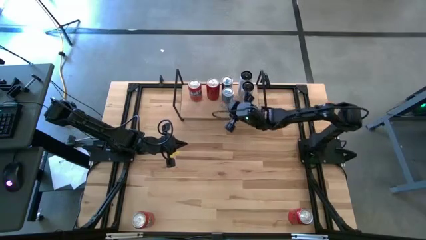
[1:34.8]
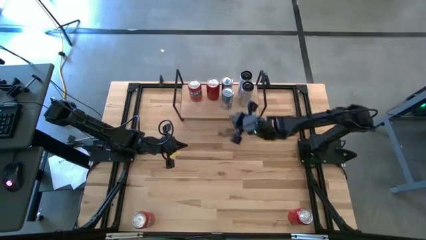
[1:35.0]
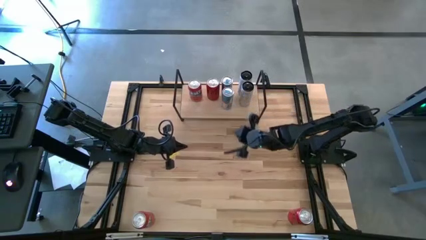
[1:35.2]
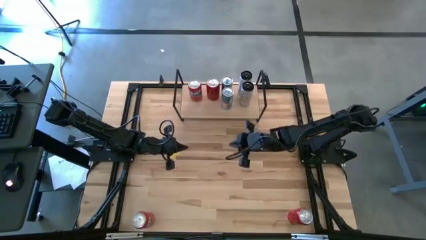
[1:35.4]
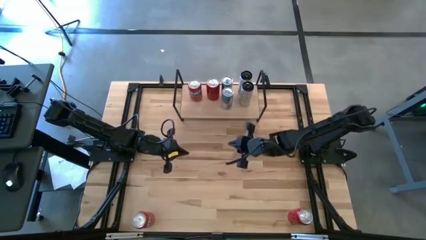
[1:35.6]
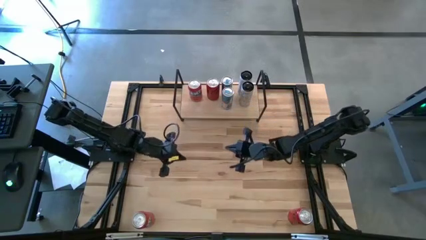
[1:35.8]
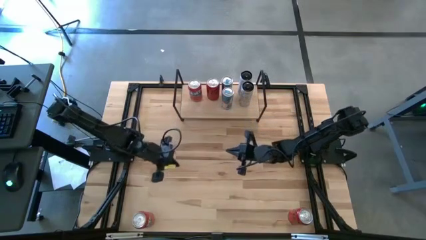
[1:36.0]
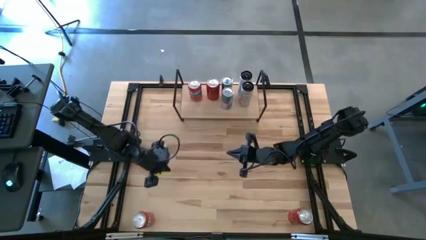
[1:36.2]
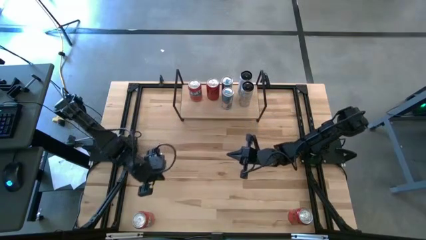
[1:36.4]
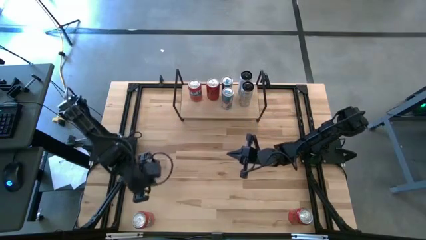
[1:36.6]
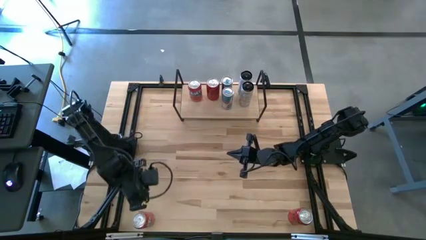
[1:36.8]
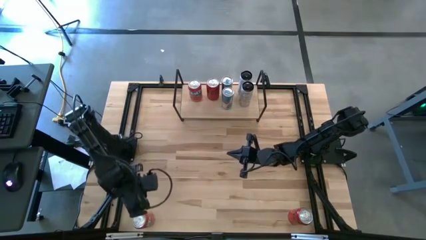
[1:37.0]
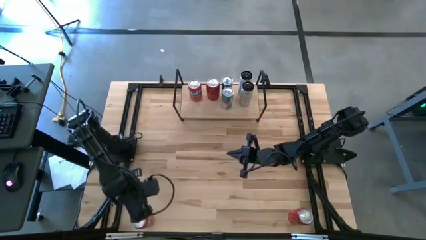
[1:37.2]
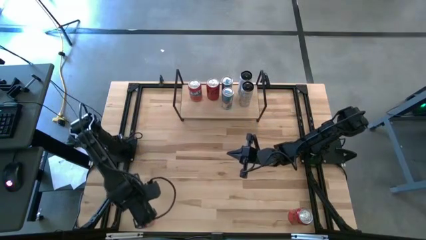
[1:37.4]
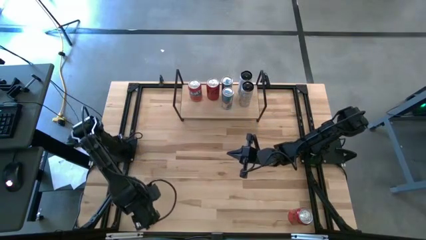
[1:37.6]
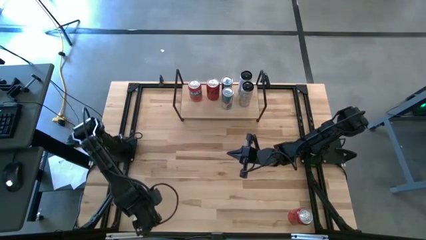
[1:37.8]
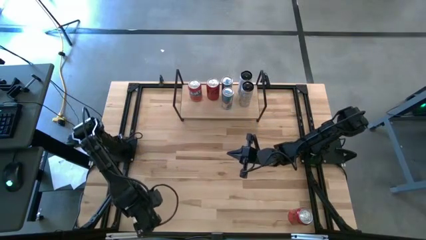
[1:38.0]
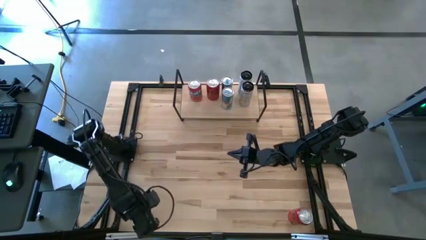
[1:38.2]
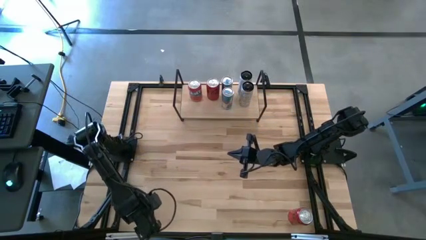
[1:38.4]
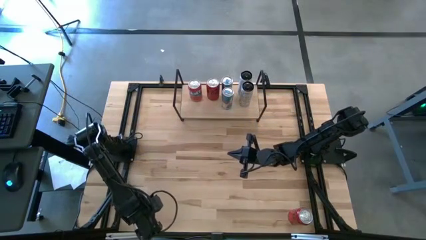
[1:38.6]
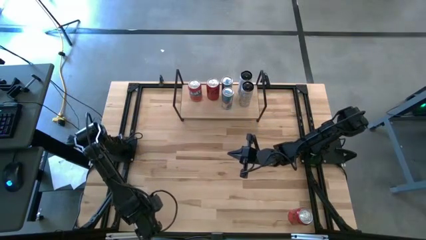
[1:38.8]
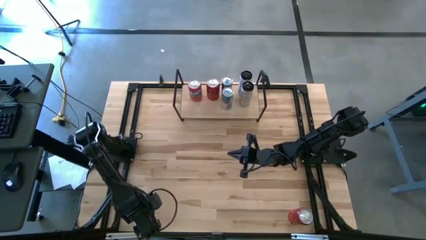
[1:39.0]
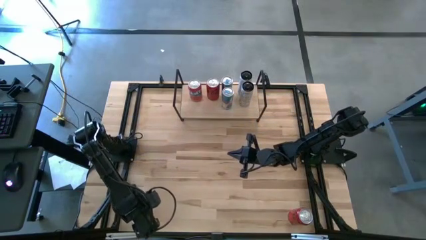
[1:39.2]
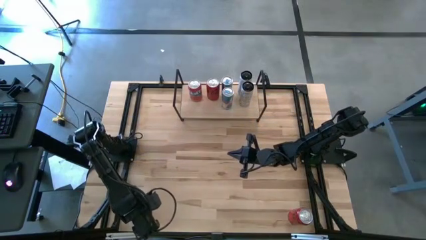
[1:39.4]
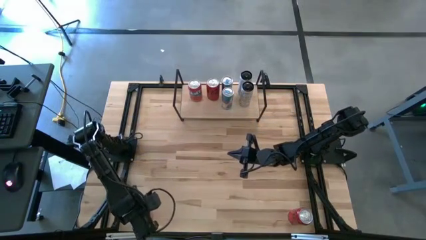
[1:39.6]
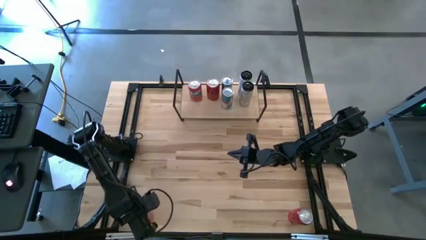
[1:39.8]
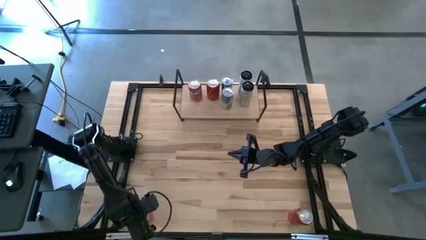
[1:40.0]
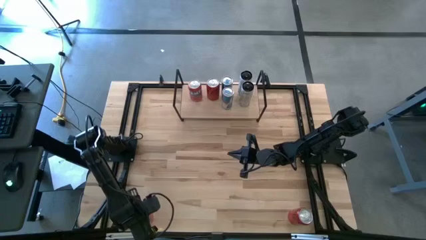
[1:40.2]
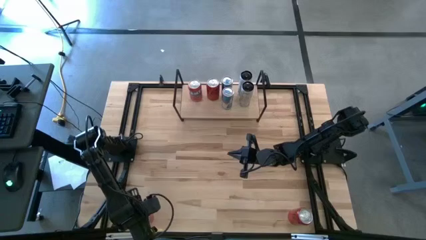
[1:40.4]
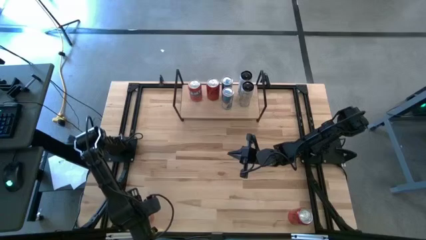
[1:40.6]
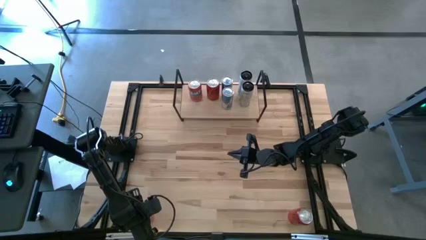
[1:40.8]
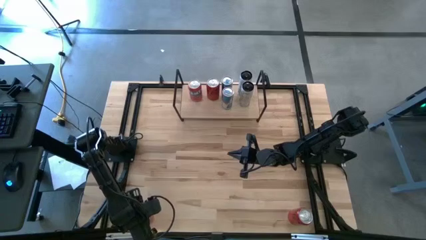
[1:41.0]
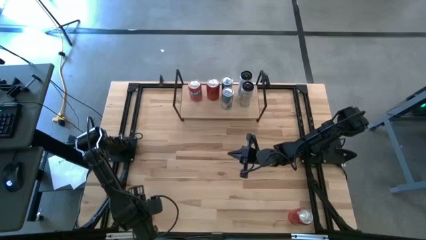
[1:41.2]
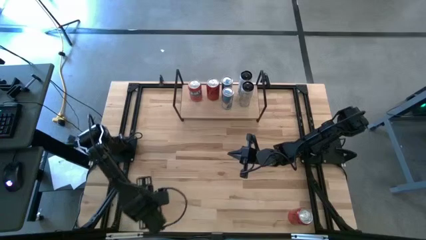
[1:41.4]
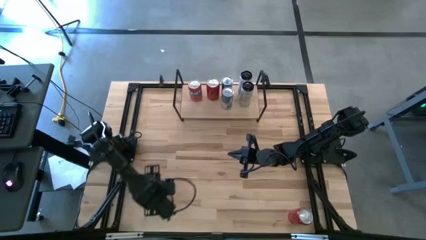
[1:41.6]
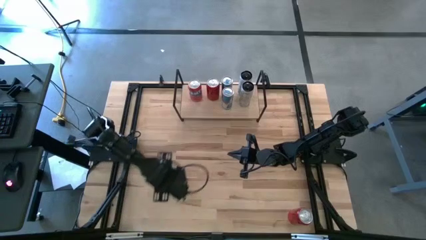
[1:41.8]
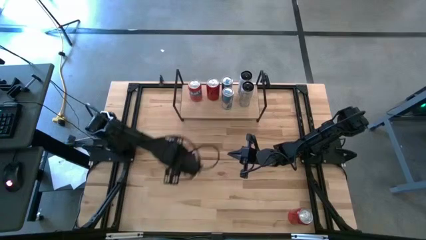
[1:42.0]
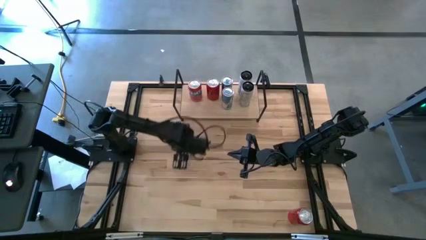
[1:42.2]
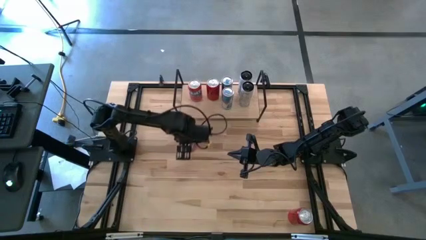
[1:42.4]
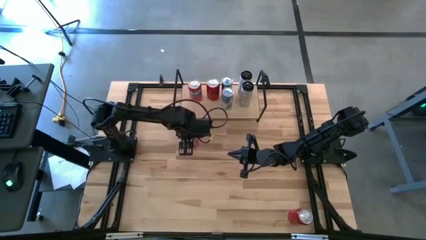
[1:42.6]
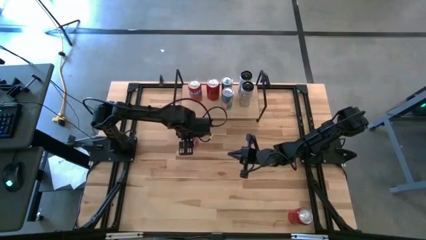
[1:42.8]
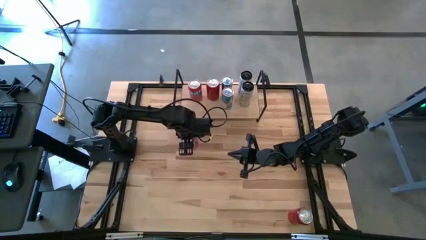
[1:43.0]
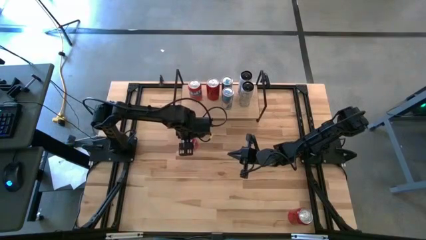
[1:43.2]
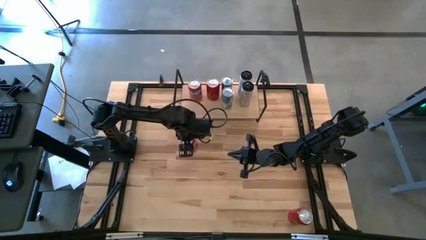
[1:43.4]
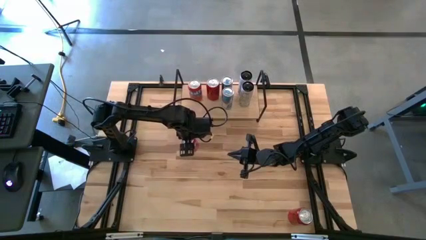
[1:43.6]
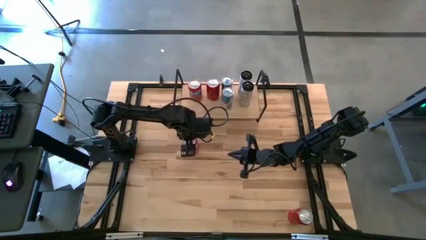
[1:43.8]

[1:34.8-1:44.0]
Task: Place canned beverage on shelf
Move the red soda can on the center of the table

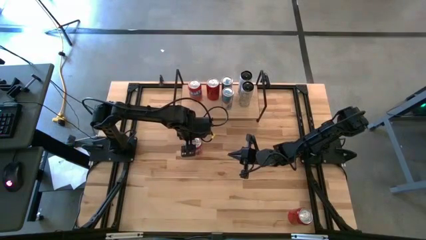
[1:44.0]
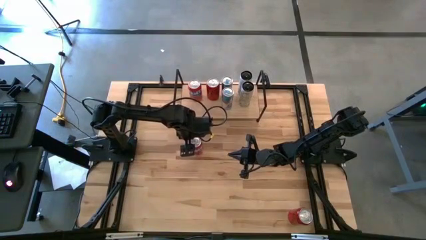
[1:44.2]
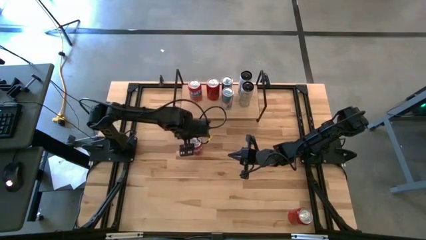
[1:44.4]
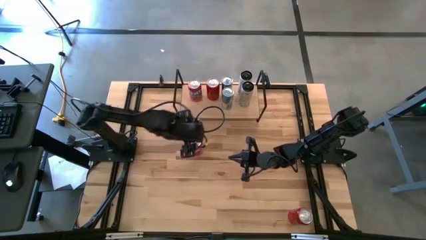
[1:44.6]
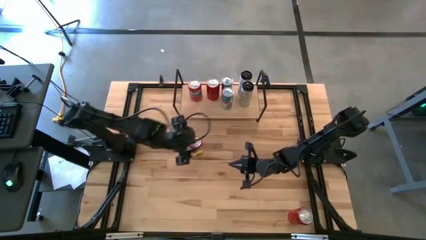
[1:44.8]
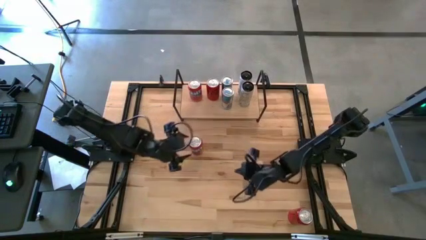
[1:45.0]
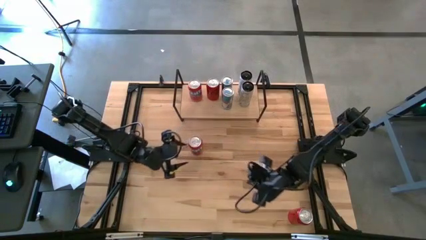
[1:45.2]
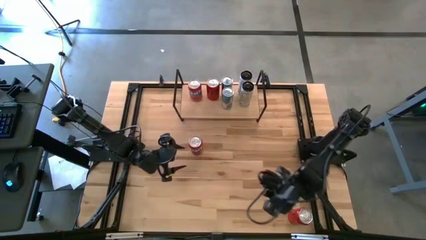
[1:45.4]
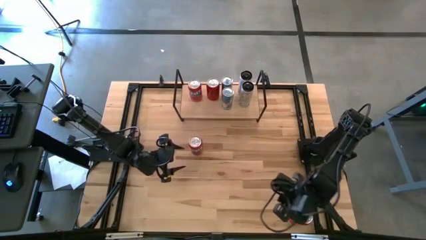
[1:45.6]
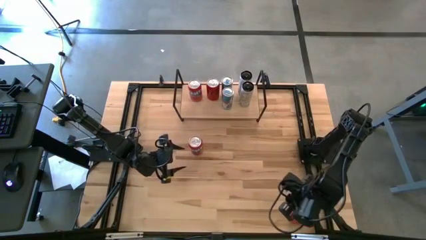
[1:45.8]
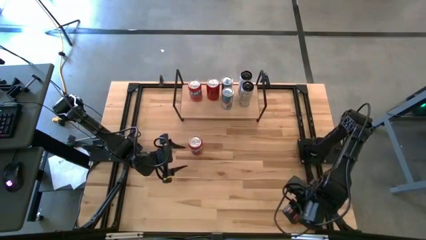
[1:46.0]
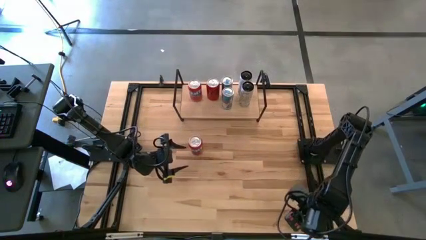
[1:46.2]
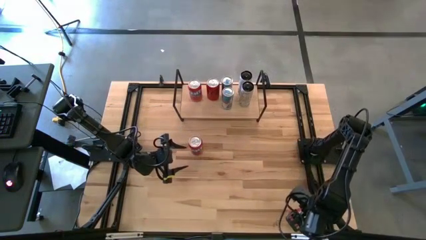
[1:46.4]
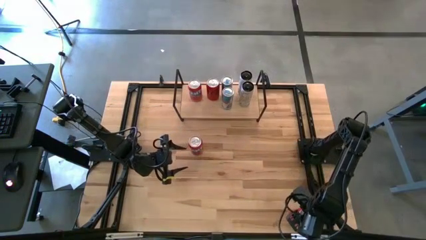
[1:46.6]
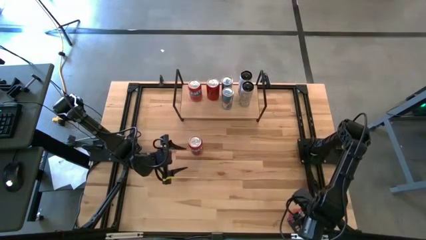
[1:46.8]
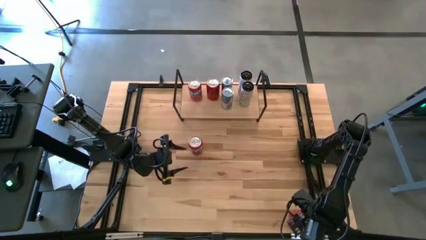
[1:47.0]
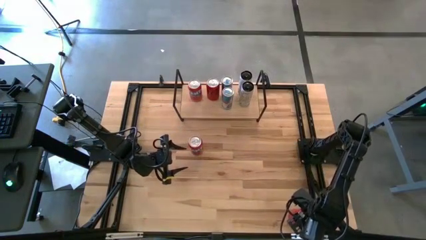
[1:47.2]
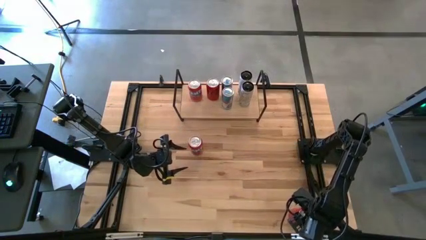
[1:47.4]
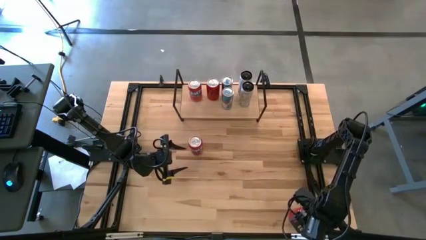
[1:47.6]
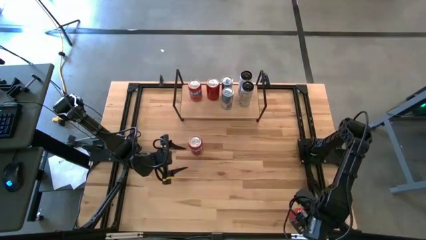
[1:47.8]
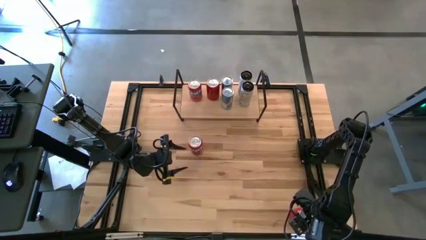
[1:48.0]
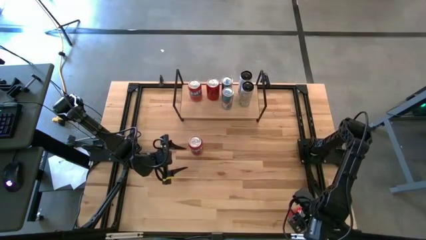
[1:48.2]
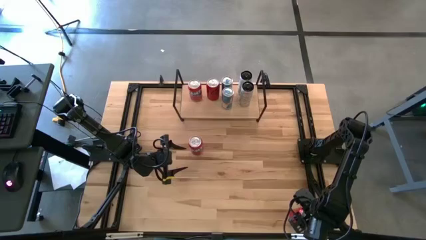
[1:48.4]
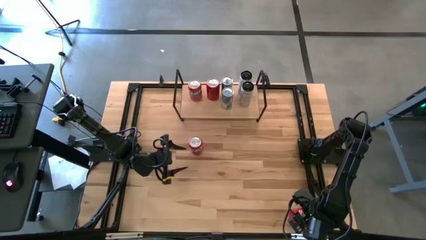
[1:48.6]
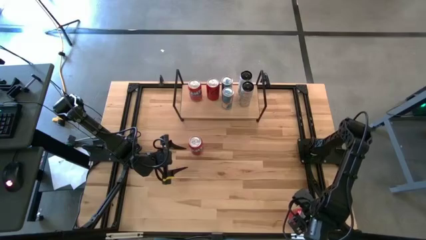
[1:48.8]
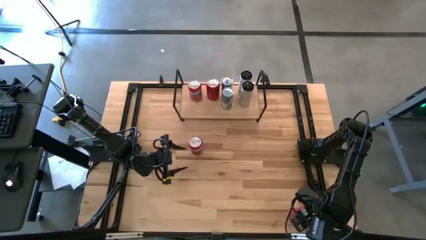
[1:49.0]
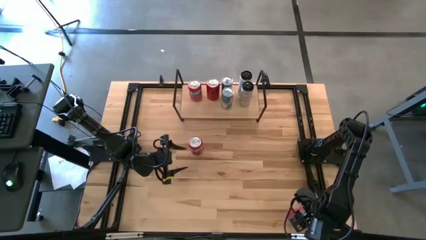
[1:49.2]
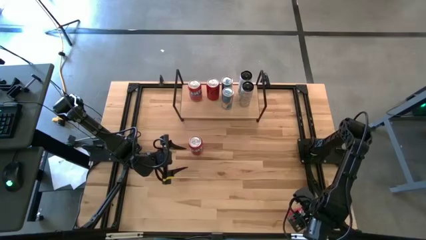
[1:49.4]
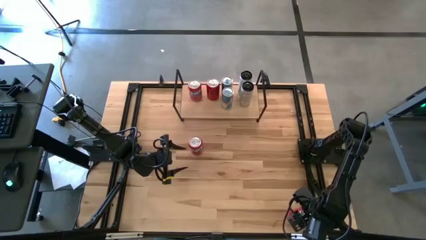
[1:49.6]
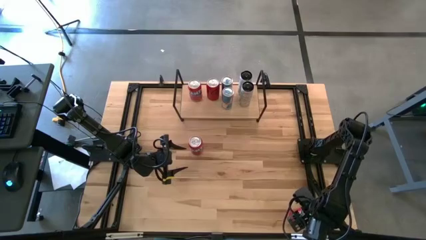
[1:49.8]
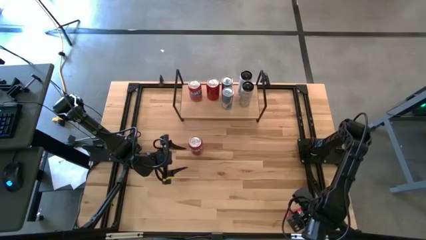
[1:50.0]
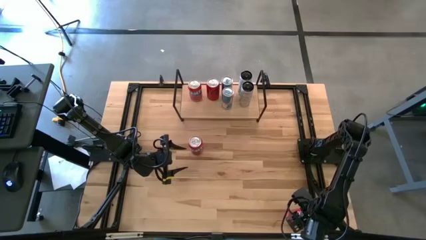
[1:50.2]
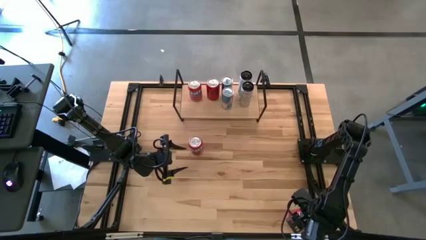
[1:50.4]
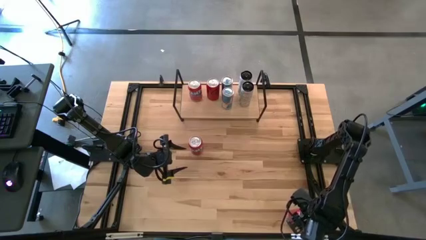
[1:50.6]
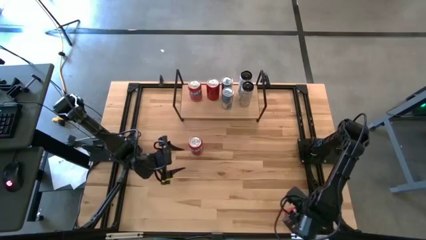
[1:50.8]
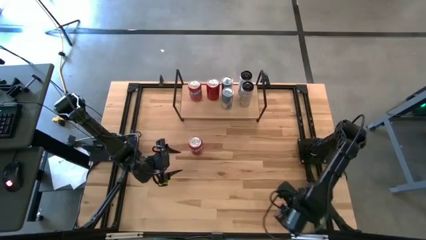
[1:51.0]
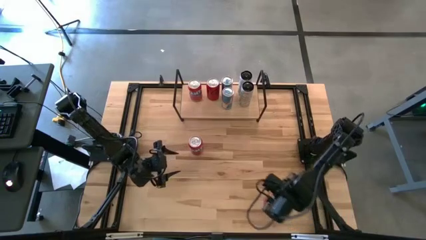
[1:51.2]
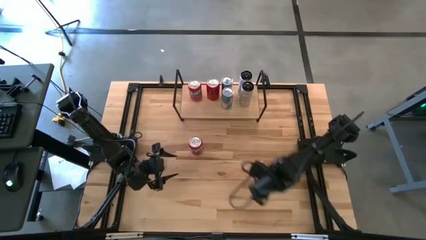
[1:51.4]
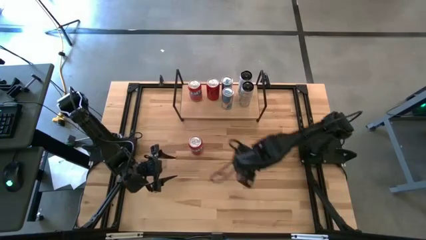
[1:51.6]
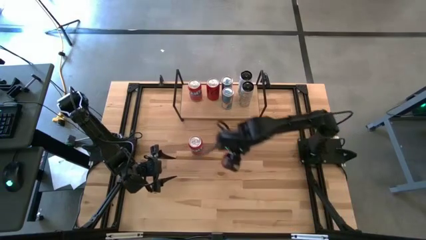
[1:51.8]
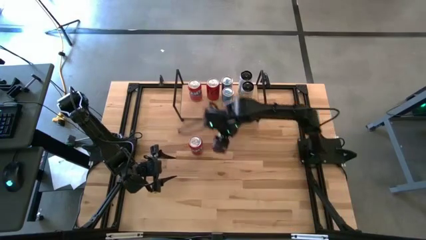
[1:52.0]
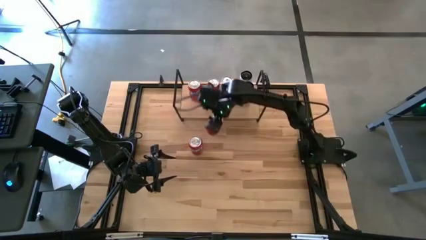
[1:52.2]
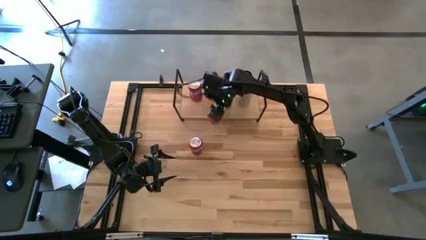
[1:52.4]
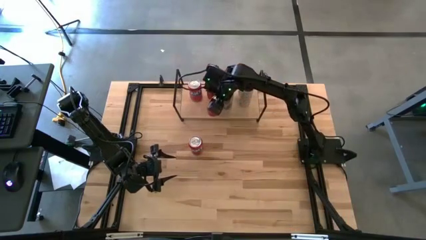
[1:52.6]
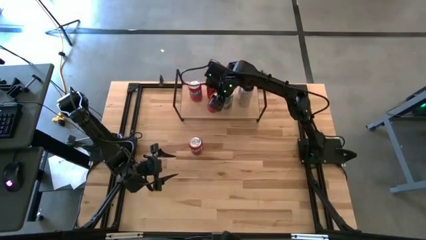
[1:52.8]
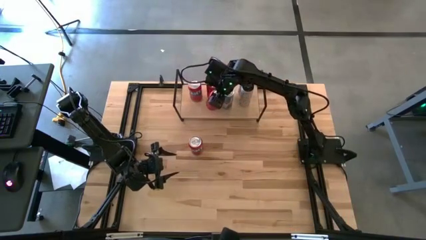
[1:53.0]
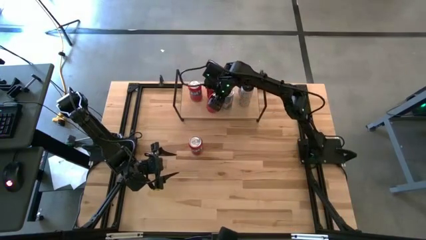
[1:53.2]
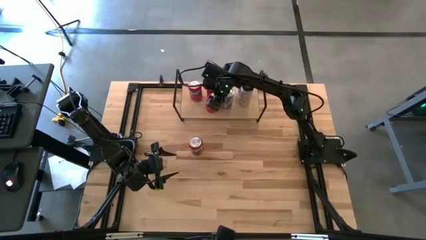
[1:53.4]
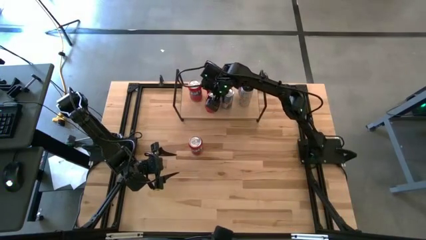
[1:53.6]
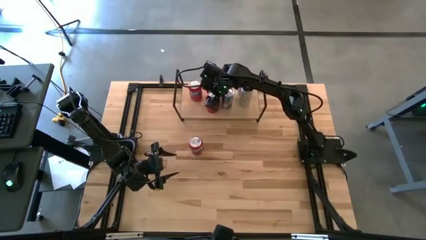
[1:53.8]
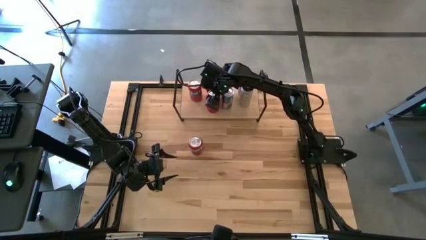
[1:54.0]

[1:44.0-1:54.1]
Put the red black soda can on the shelf and align with the other red black soda can
